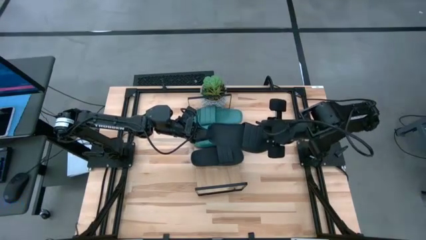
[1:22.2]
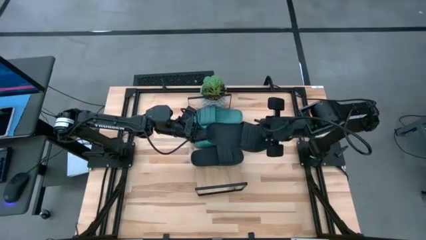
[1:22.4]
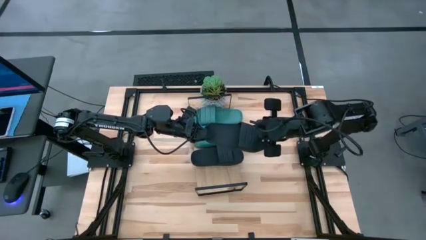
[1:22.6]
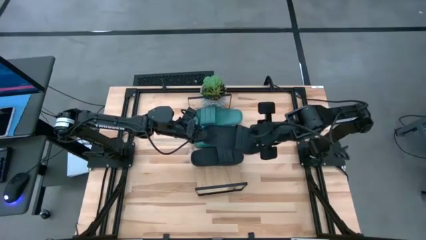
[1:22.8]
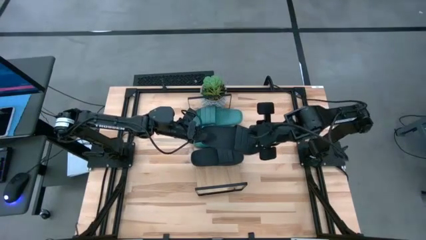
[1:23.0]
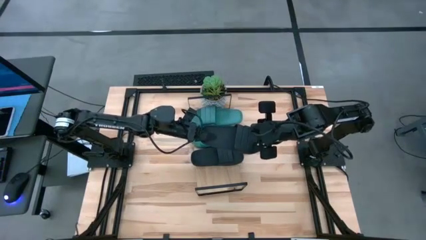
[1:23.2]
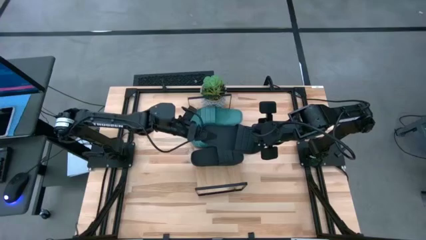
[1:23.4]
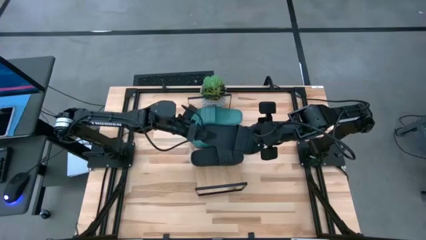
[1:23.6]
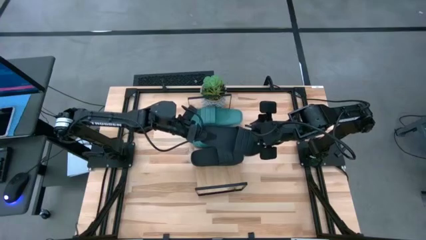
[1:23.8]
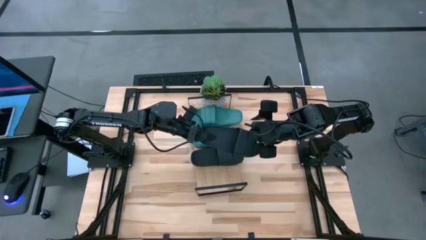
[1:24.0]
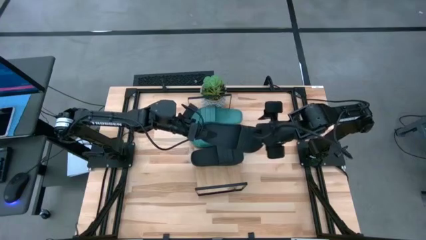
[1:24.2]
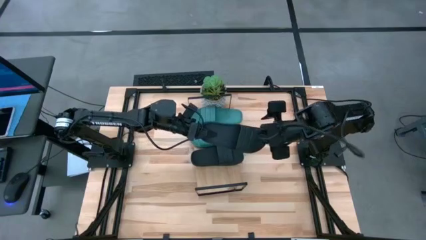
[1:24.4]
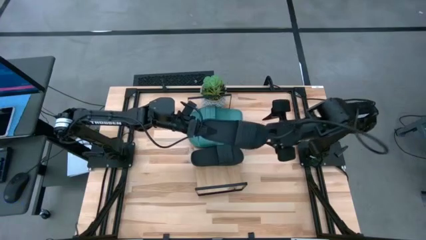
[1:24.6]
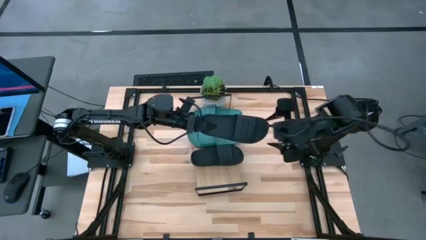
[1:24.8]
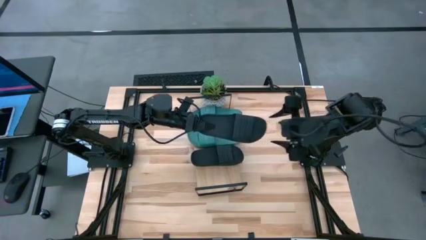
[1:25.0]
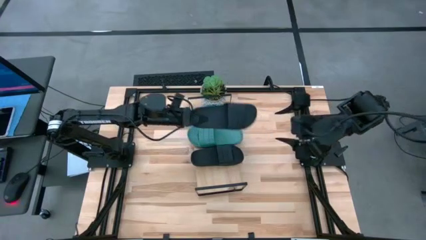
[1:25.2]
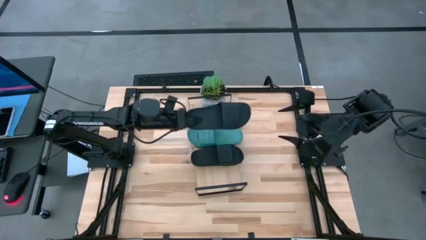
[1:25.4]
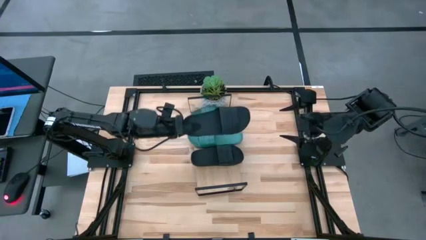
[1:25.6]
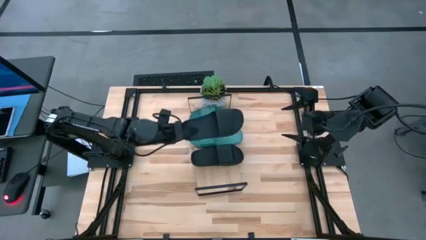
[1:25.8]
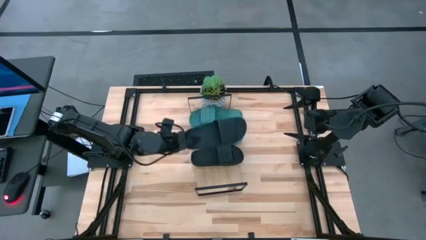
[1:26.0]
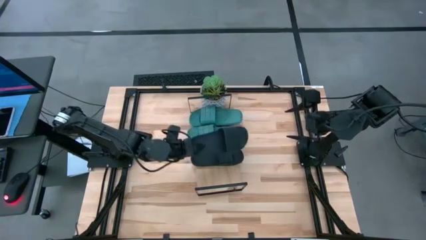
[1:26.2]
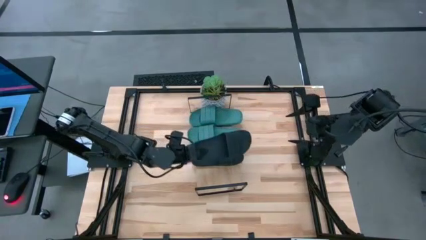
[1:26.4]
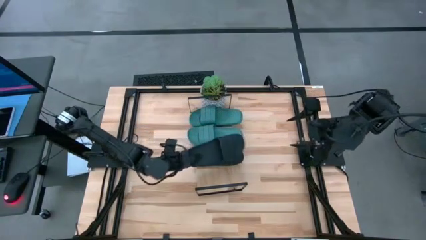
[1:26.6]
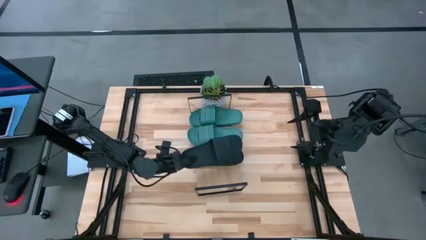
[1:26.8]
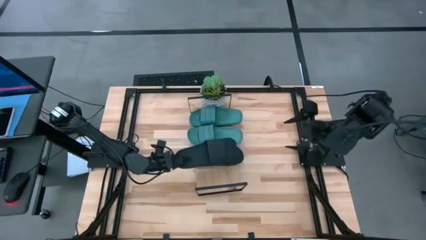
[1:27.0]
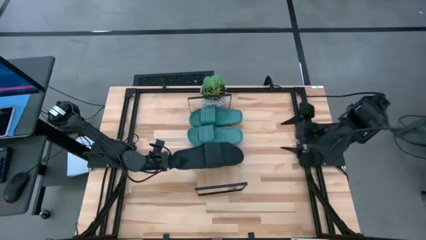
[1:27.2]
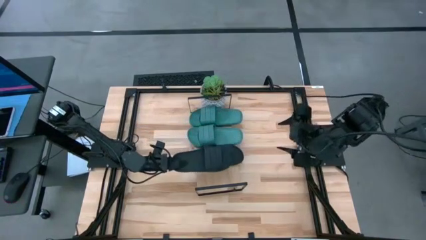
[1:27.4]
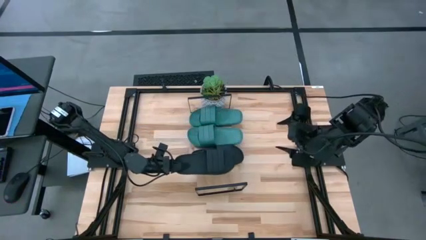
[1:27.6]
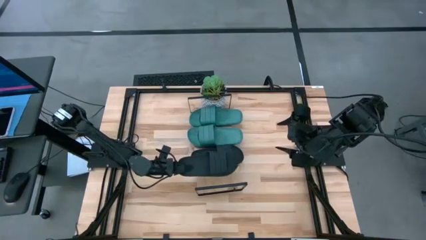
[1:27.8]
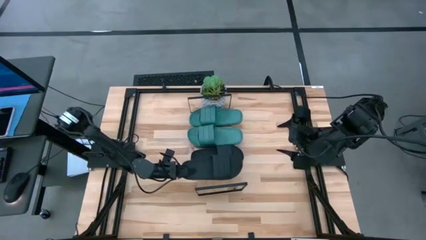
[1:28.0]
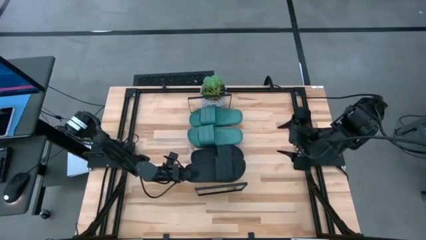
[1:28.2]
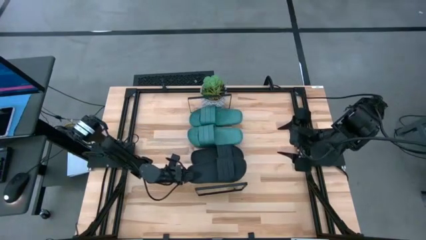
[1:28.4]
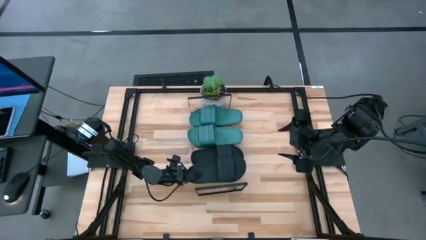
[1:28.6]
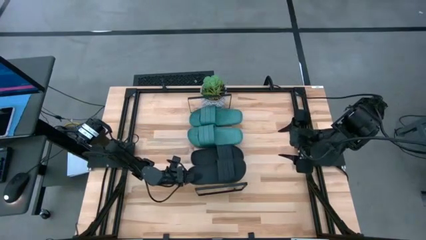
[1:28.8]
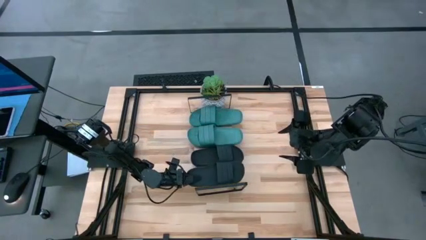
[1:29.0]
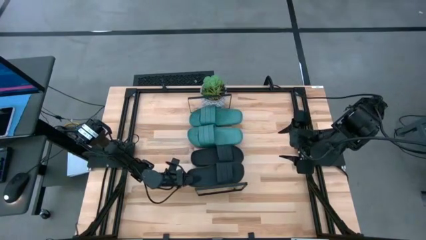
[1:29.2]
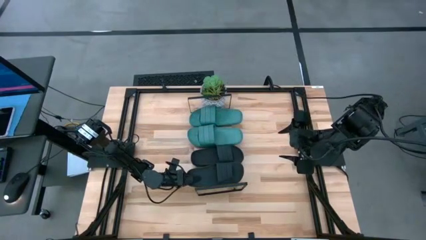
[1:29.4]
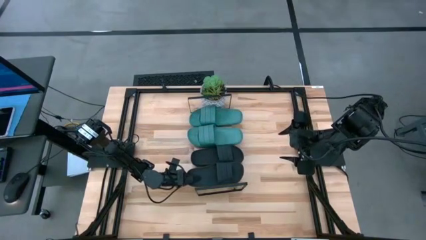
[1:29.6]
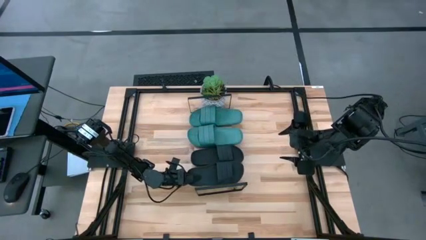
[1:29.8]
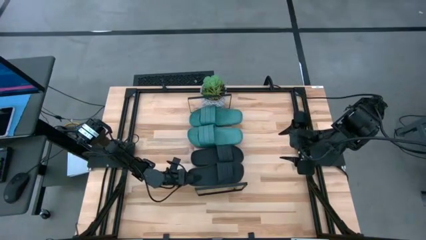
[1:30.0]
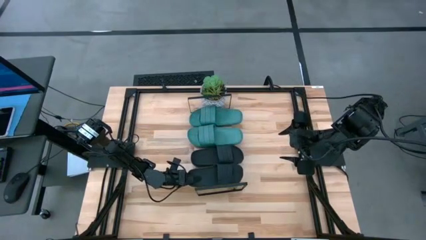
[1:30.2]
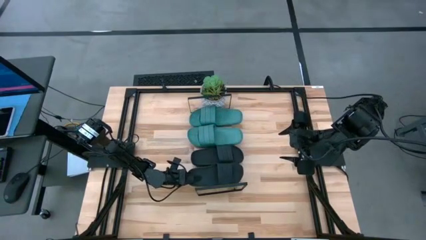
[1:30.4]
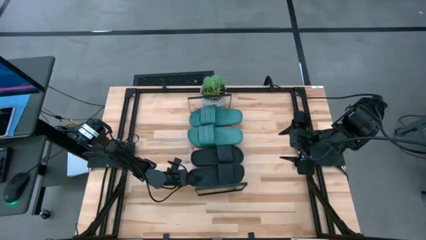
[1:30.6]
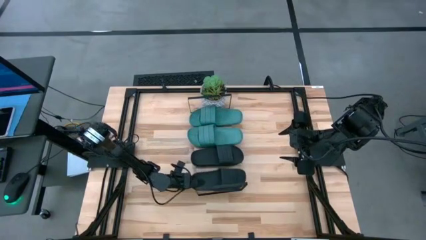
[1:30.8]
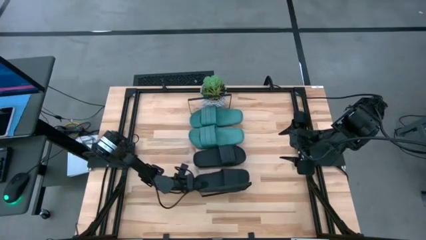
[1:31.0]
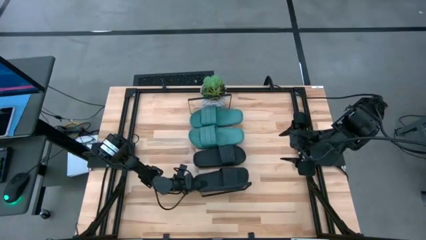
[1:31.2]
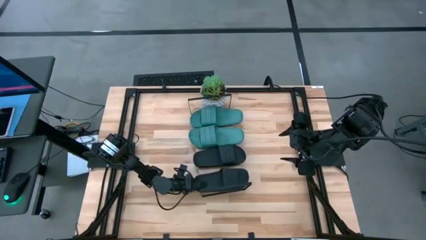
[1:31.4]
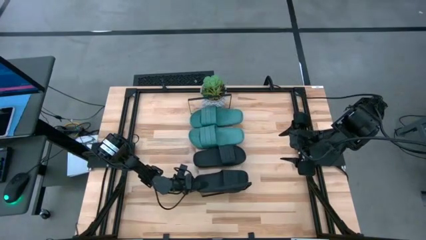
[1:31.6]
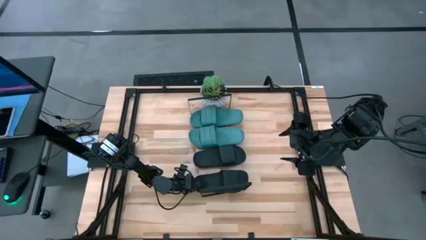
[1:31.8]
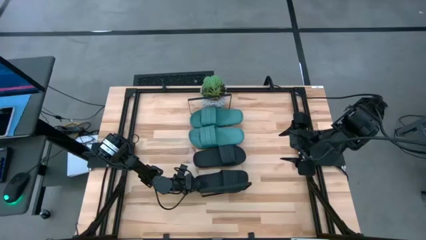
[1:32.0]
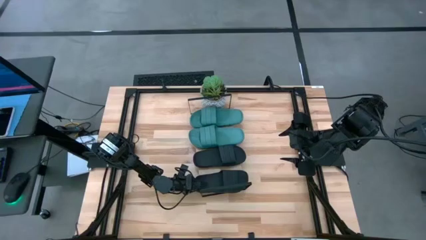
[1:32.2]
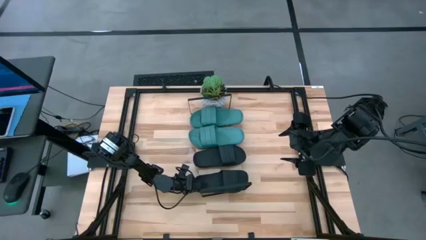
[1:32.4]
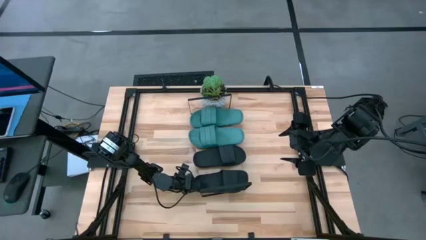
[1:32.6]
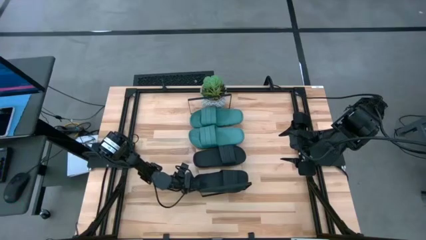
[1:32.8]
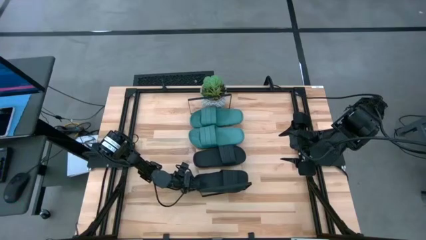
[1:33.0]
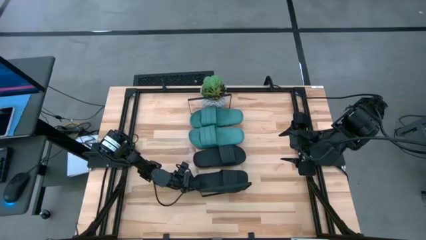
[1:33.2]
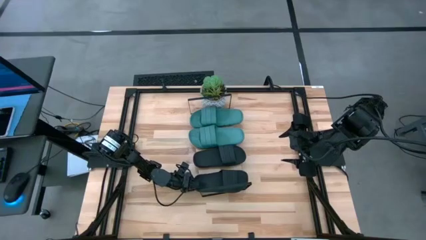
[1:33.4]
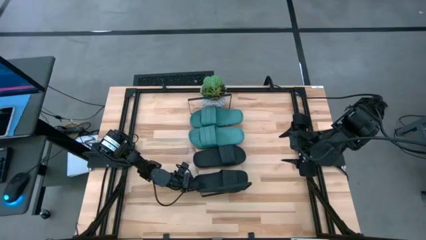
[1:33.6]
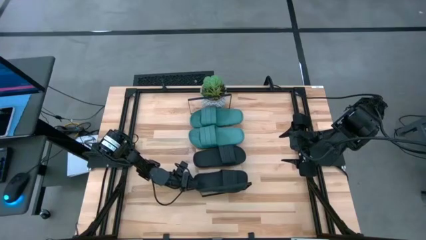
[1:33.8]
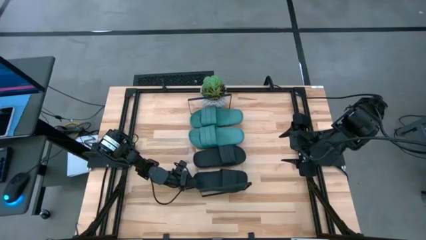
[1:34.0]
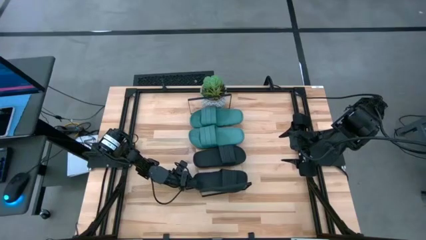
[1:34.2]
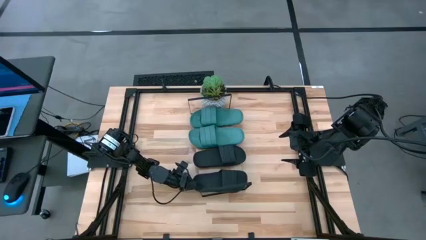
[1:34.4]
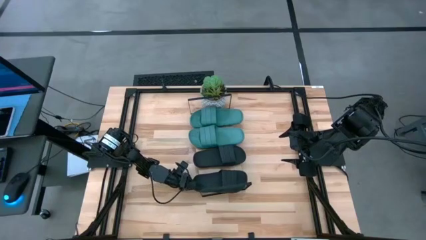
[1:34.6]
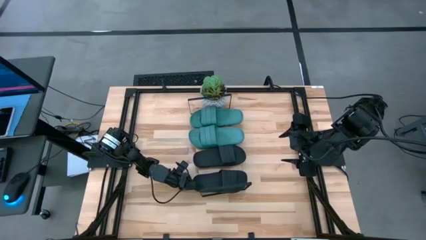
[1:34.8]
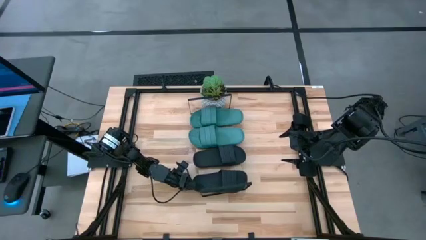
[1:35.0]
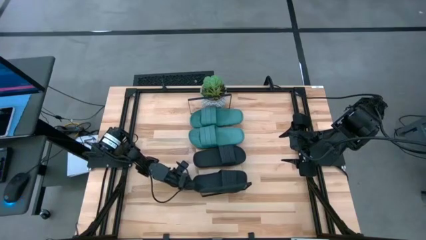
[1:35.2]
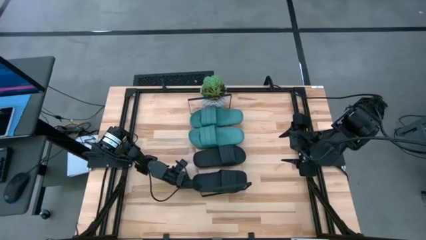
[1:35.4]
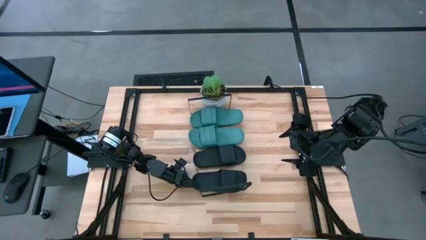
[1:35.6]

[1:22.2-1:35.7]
Task: Pick and place slides into the shelf
Put the black slides on the shelf
